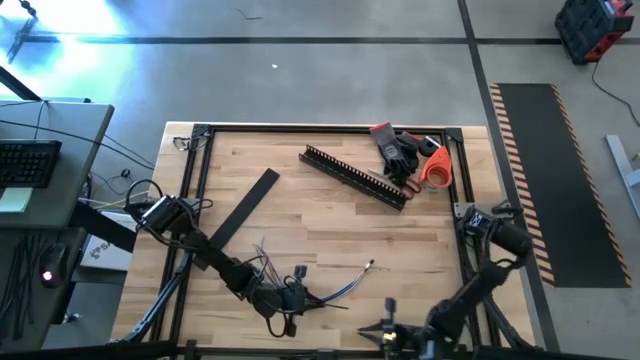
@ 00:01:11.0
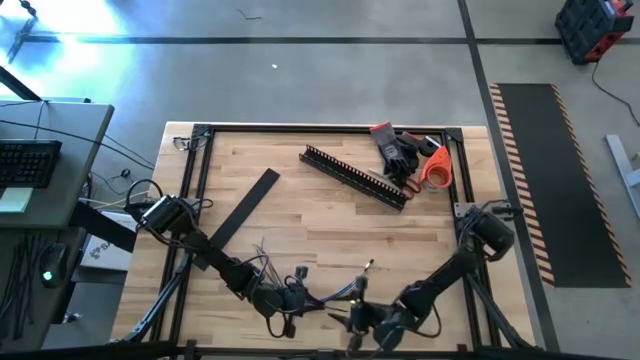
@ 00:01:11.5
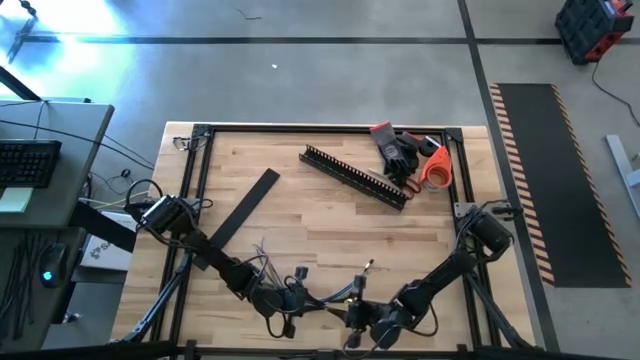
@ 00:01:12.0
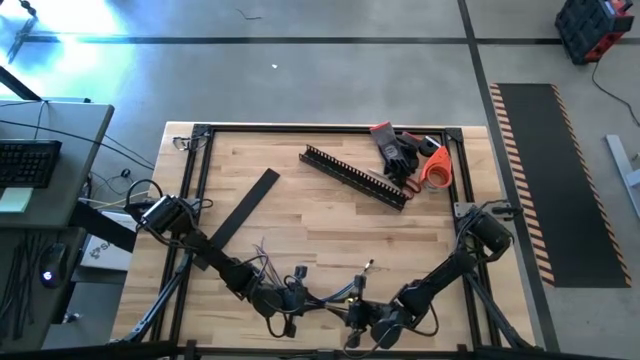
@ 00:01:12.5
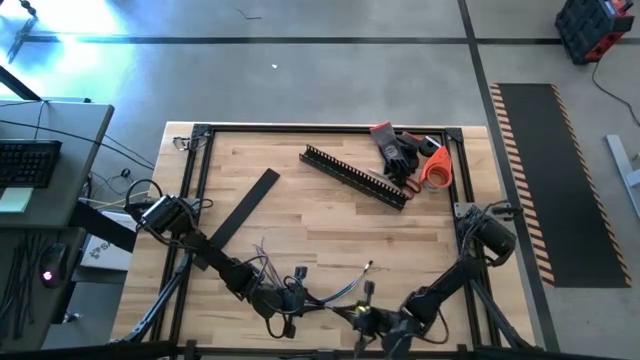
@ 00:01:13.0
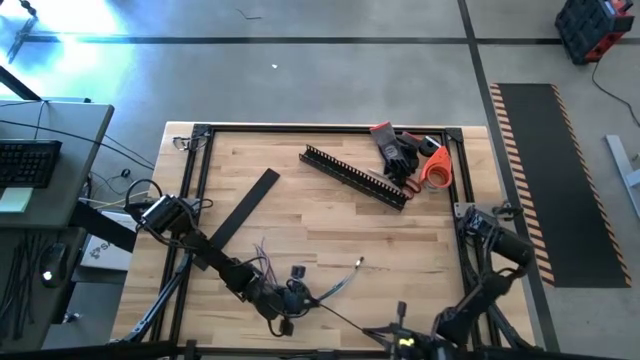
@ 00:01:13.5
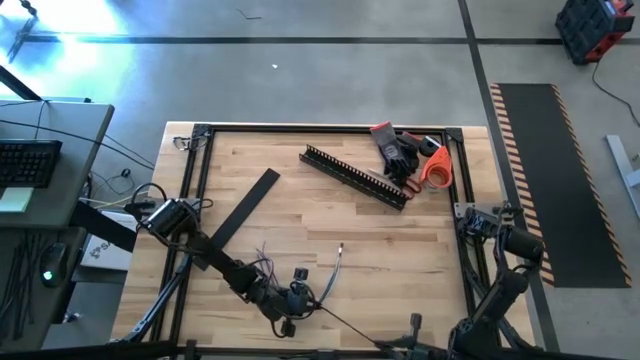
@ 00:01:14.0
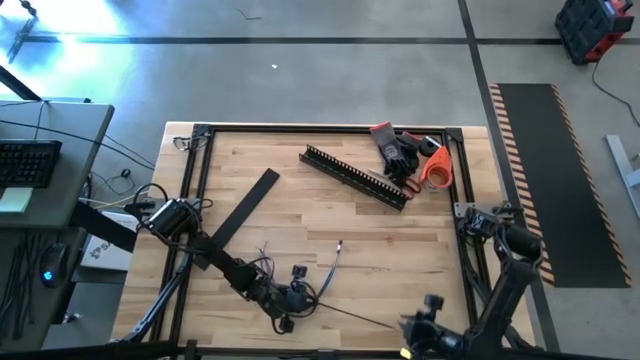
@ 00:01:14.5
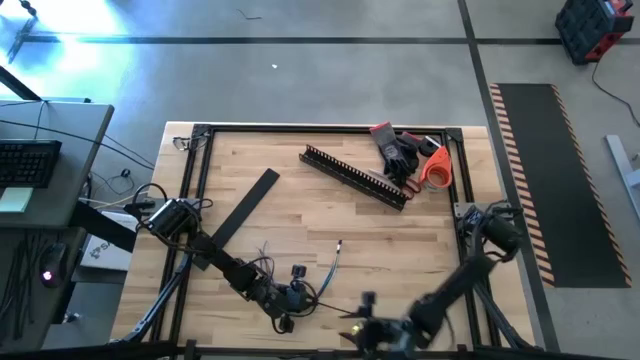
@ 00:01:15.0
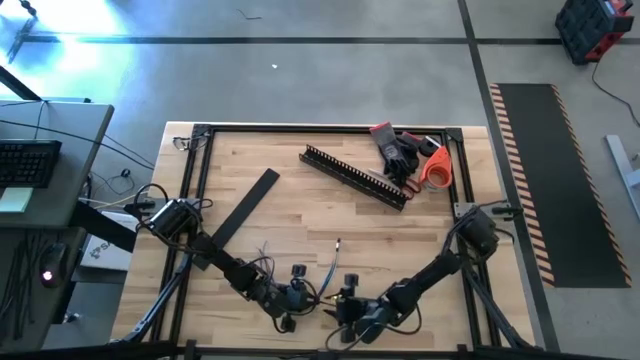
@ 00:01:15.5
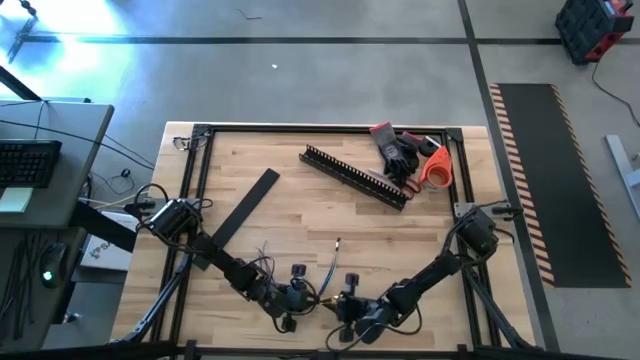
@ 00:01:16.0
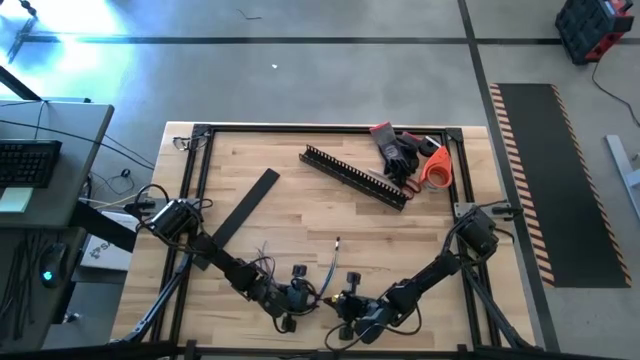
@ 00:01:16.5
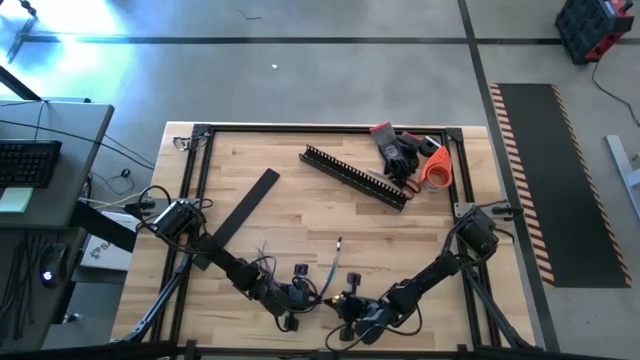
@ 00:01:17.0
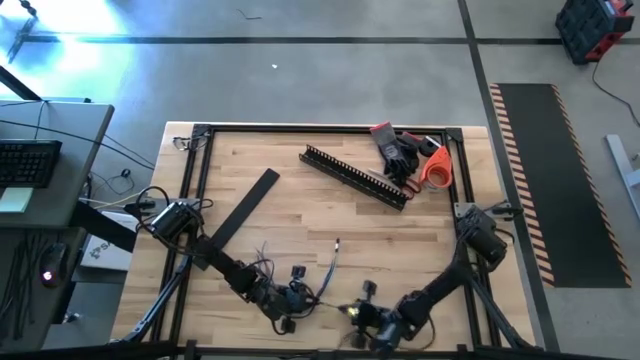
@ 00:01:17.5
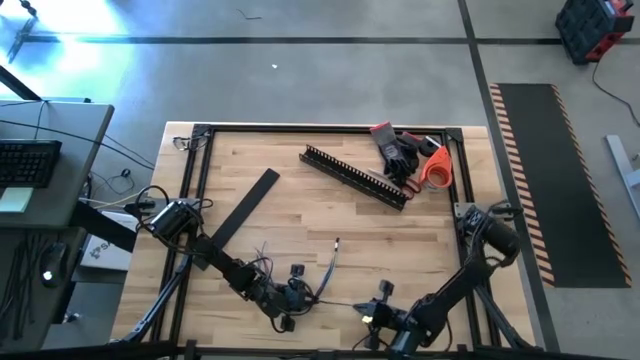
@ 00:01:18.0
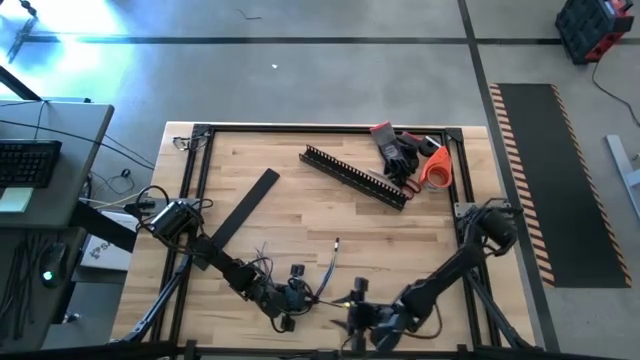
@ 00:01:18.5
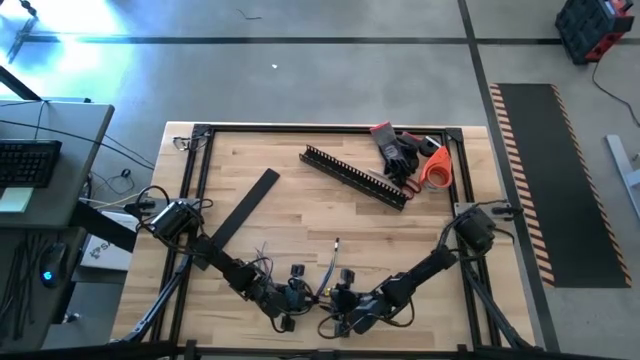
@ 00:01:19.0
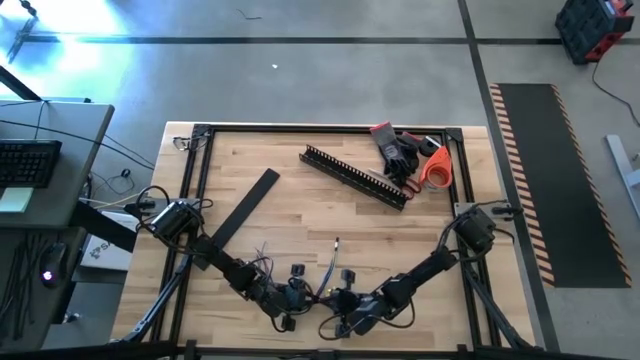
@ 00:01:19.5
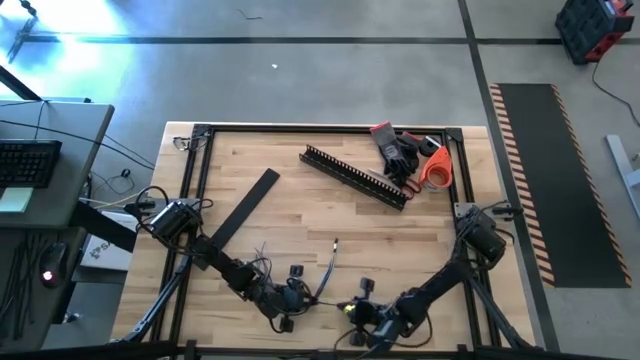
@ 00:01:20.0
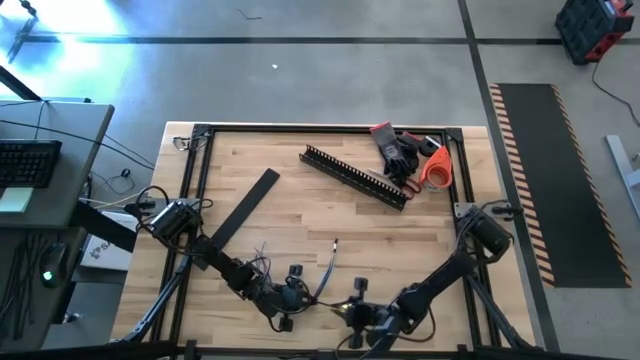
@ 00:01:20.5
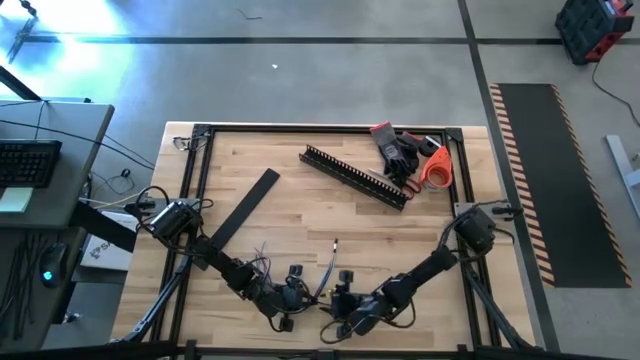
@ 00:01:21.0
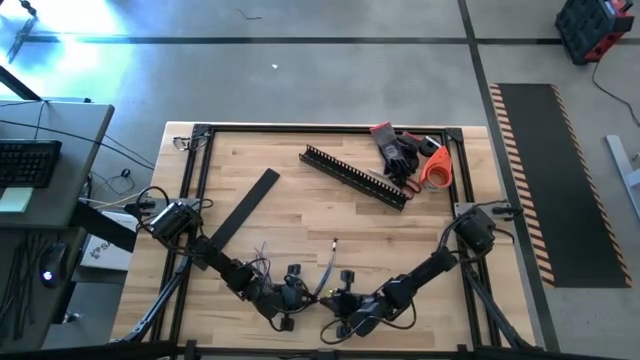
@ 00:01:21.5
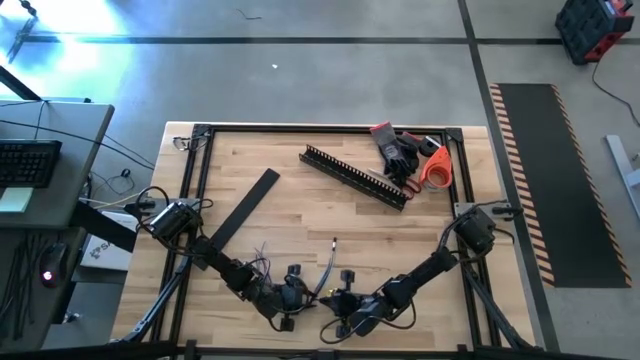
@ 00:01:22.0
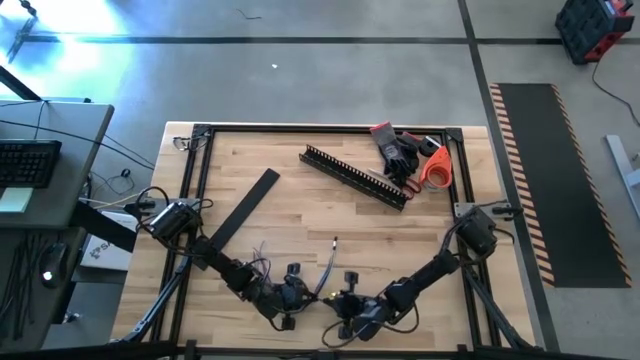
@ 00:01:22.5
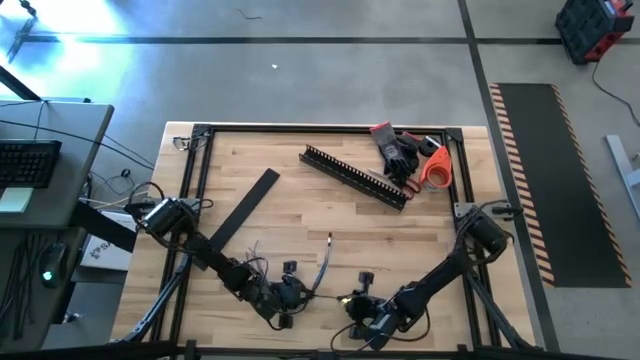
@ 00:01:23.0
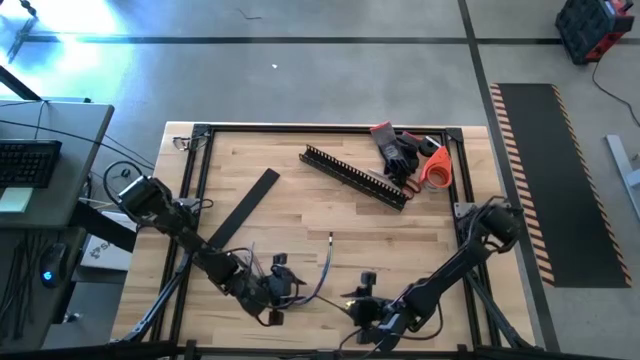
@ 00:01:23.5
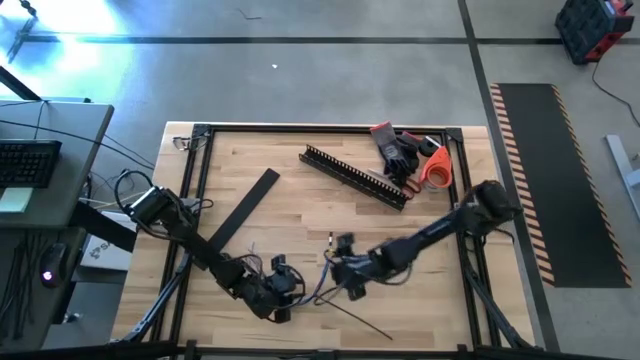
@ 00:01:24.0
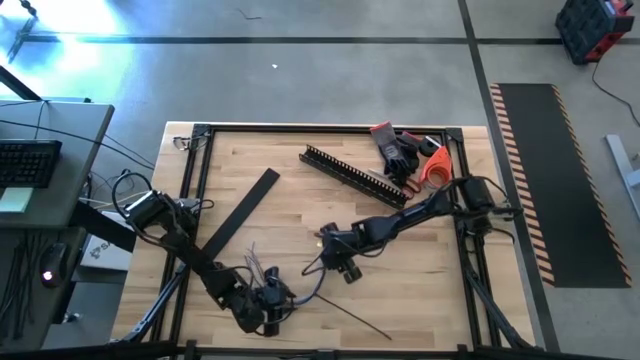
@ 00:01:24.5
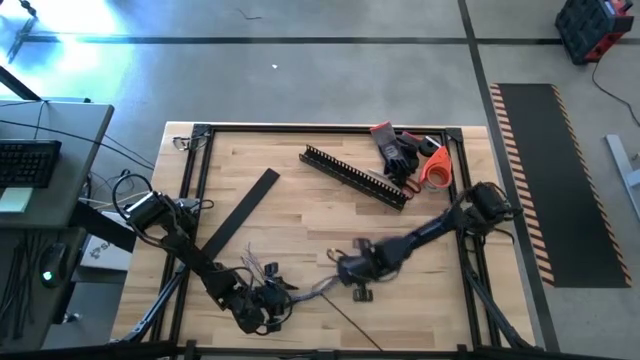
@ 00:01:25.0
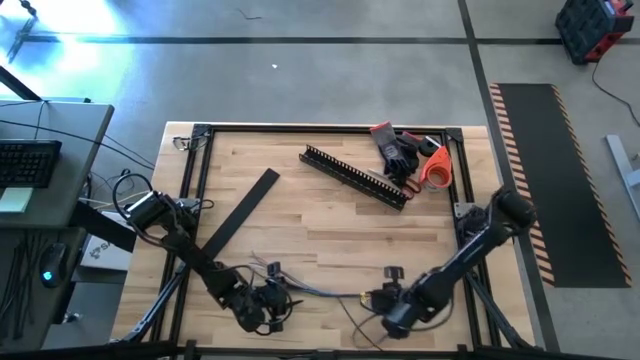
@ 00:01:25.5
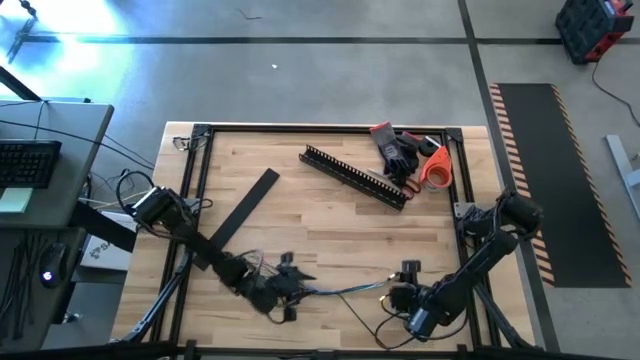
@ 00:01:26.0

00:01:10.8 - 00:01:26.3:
Task: Ziptie cables
Wrap the black zip tie on the cables

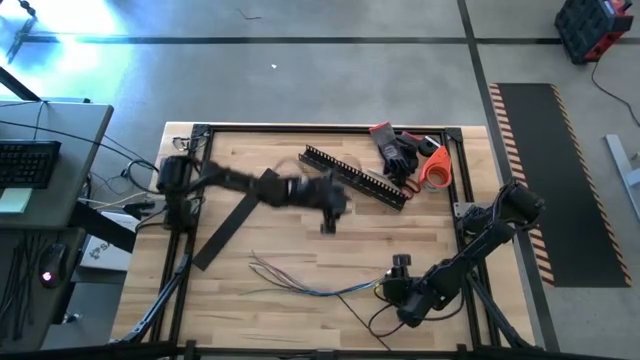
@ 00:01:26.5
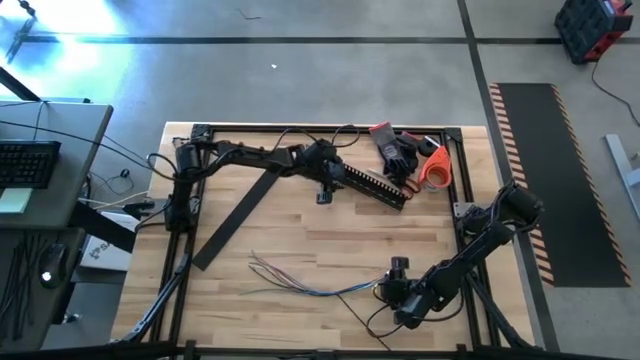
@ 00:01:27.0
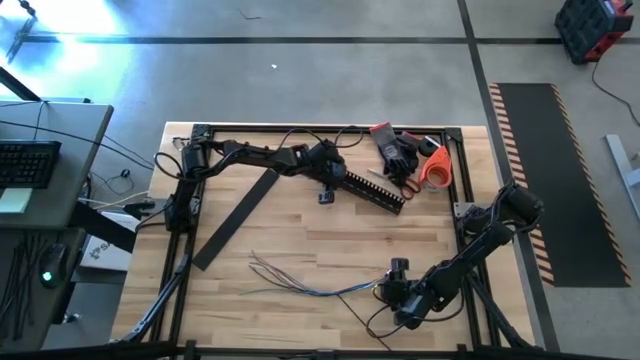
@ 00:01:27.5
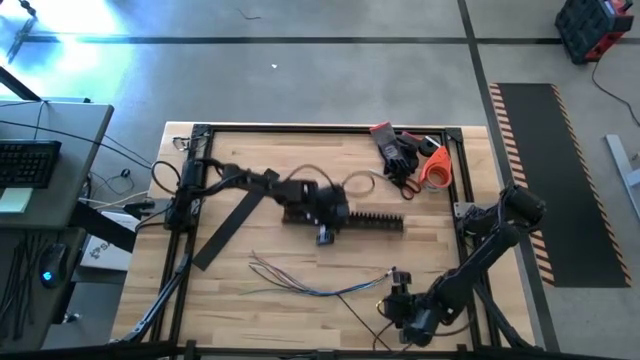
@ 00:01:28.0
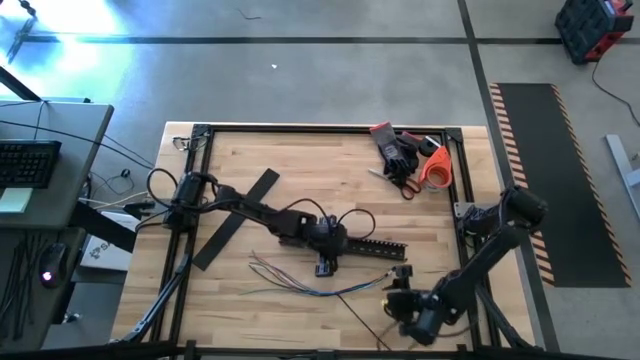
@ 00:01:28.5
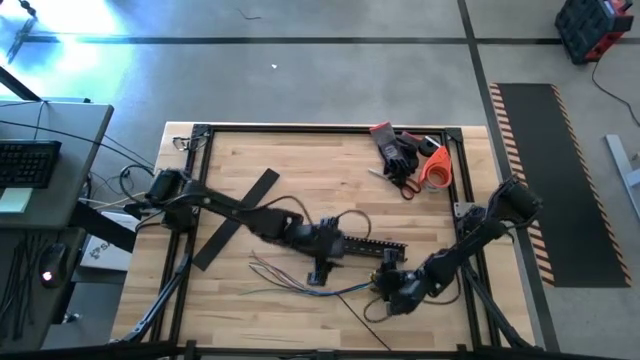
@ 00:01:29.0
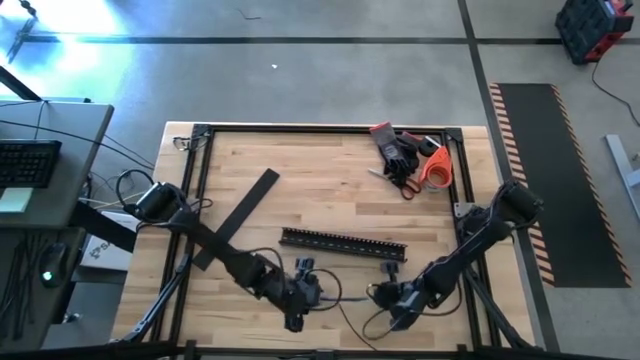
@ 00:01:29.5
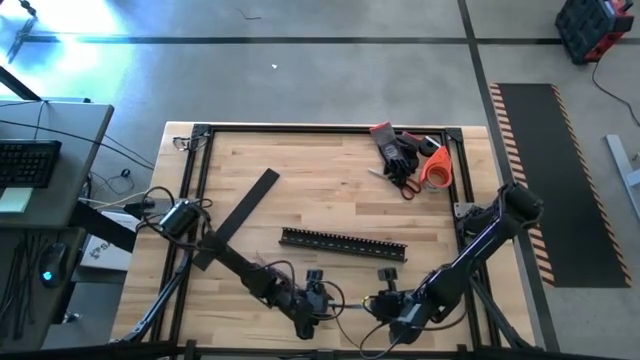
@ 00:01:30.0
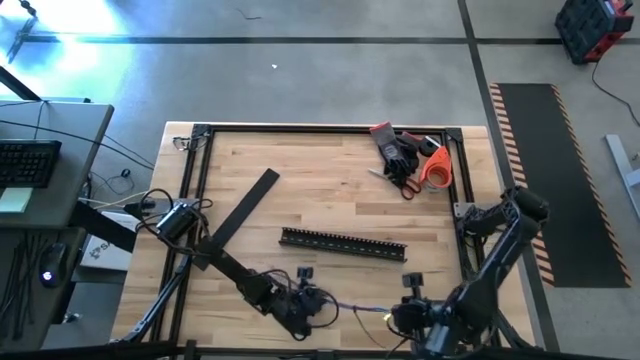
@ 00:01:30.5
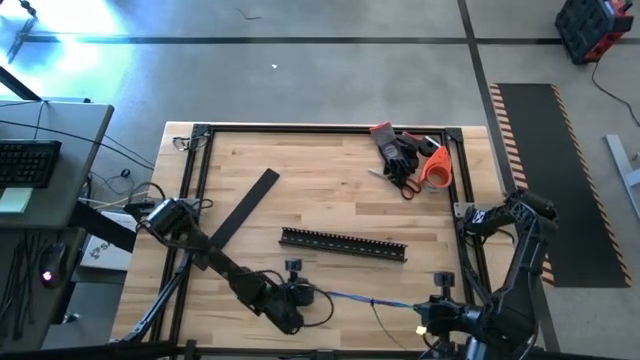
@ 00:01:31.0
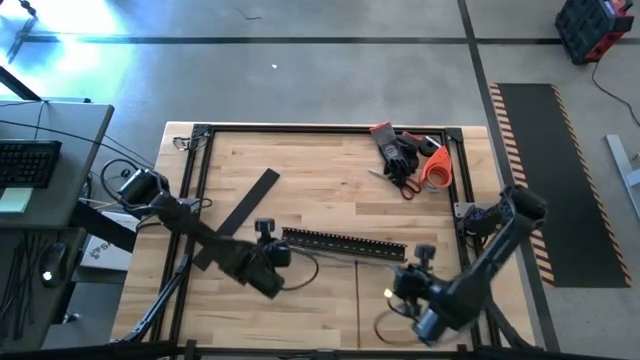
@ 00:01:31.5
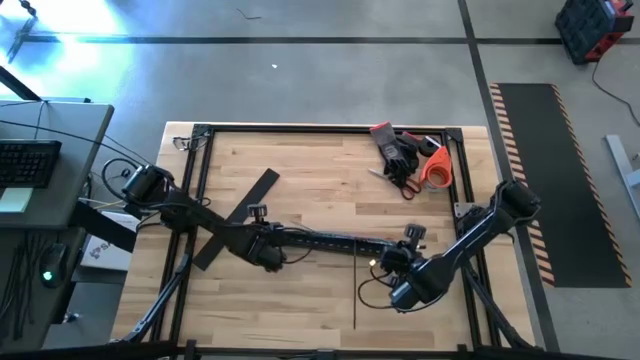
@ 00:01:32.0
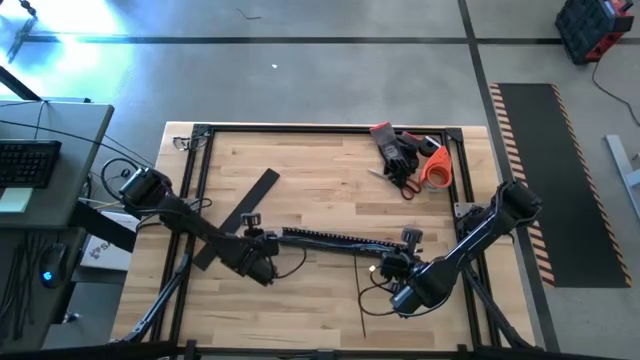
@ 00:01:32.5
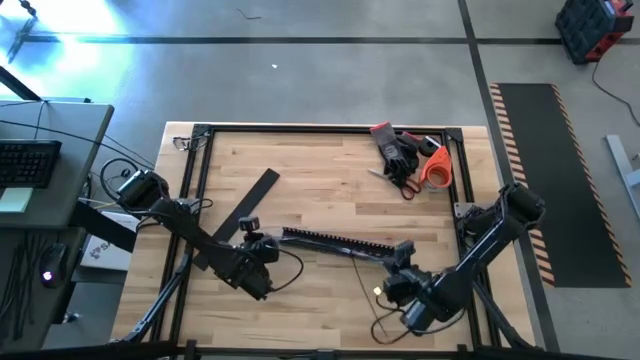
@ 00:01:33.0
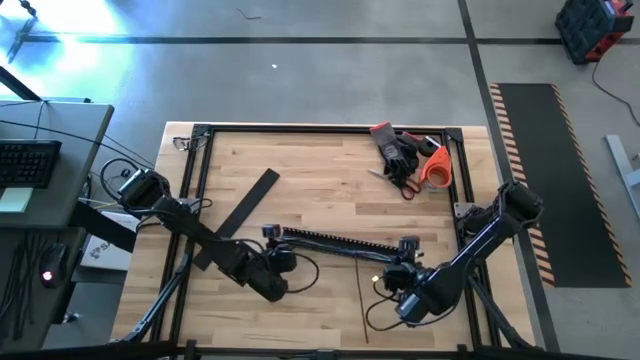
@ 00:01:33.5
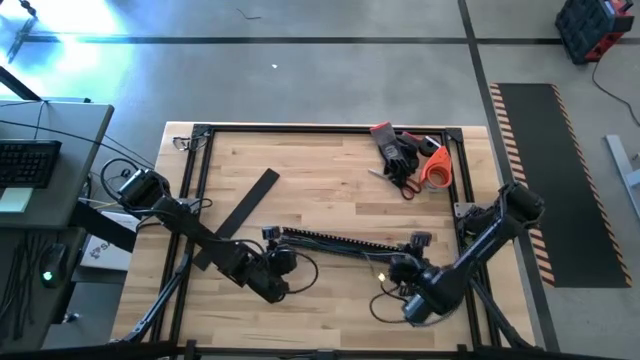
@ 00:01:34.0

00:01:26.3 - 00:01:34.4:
Put the zip-tied cable wires into the black cable duct
